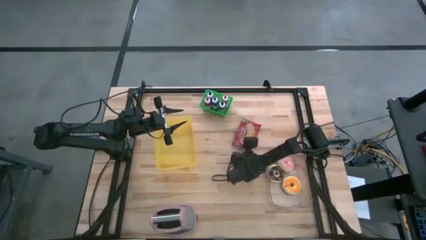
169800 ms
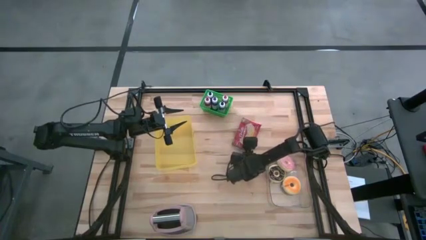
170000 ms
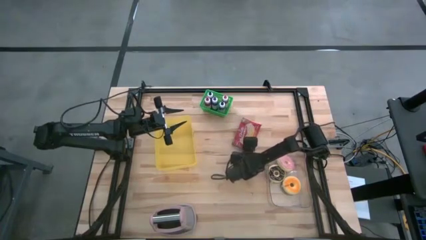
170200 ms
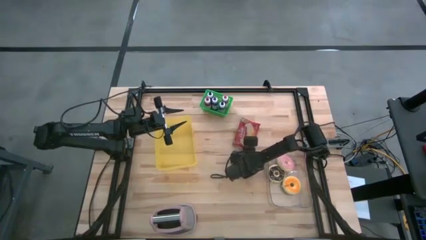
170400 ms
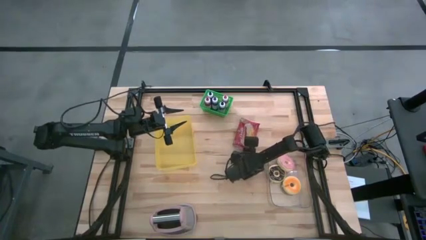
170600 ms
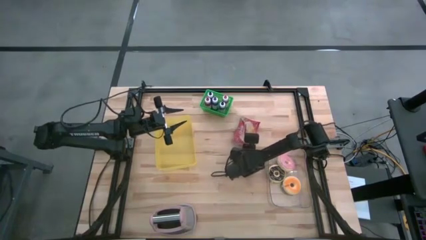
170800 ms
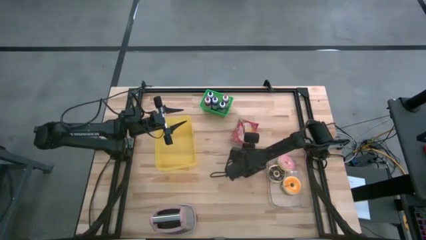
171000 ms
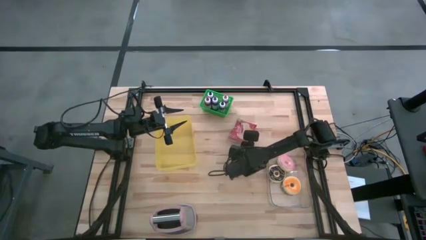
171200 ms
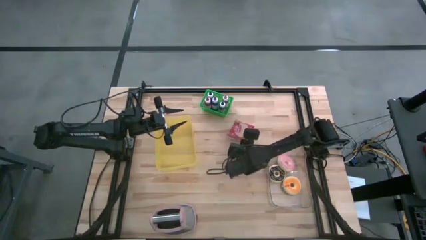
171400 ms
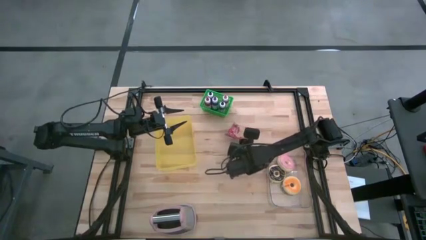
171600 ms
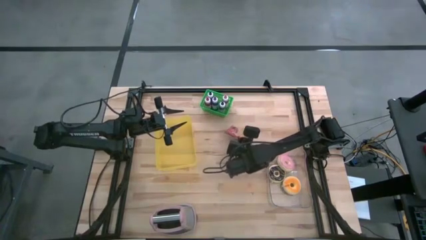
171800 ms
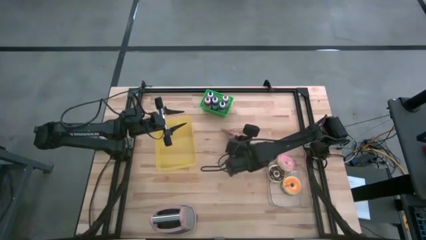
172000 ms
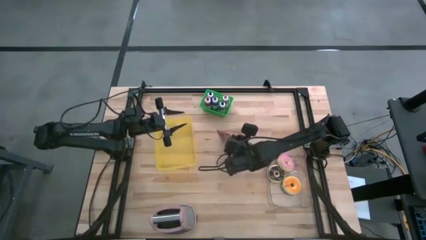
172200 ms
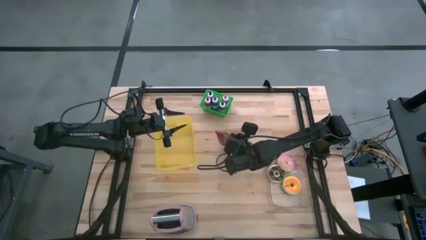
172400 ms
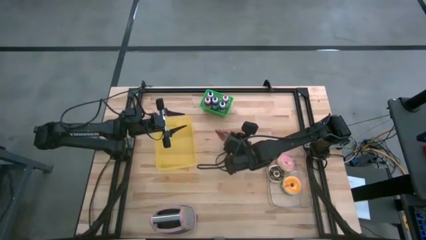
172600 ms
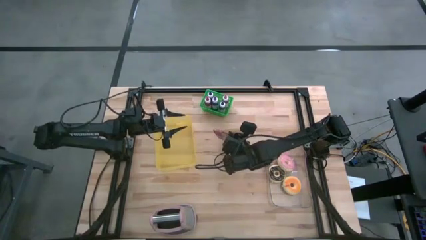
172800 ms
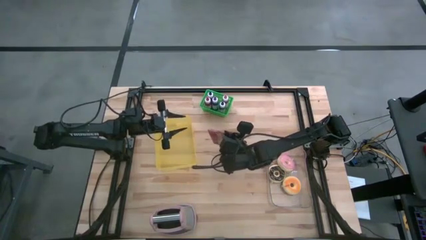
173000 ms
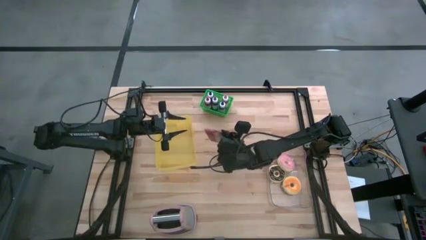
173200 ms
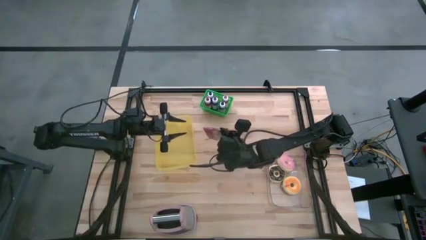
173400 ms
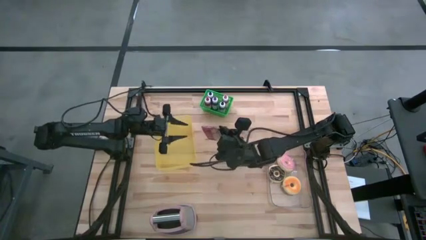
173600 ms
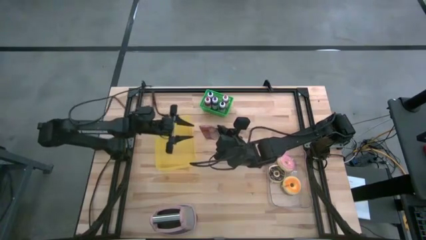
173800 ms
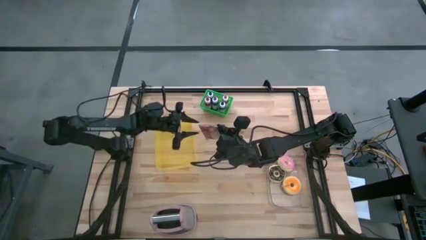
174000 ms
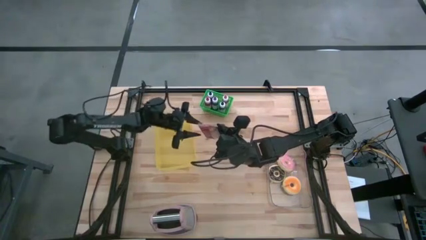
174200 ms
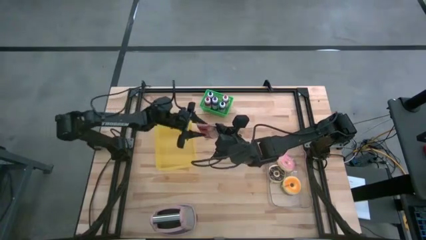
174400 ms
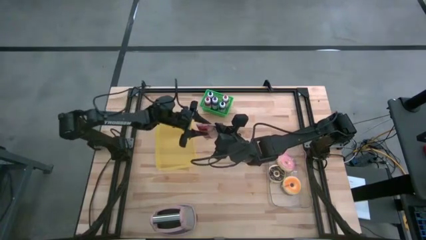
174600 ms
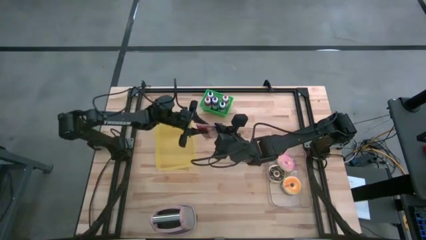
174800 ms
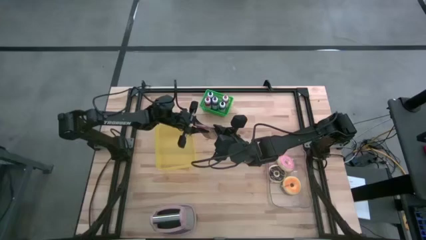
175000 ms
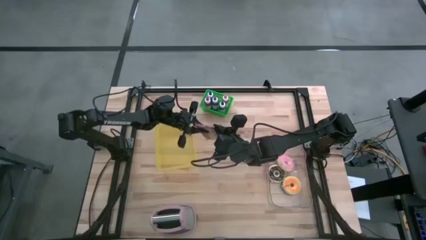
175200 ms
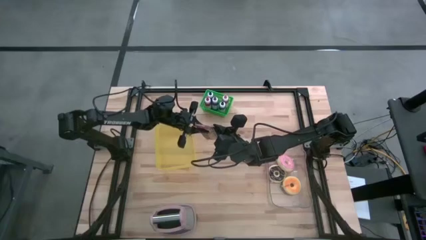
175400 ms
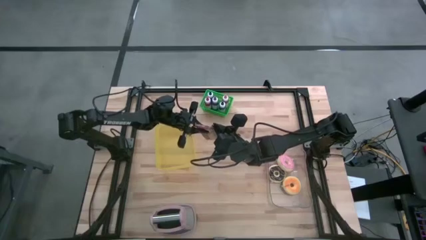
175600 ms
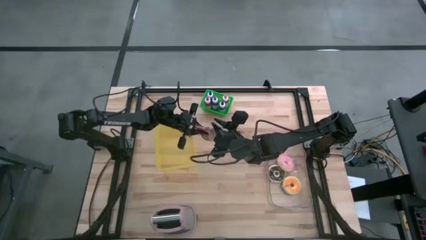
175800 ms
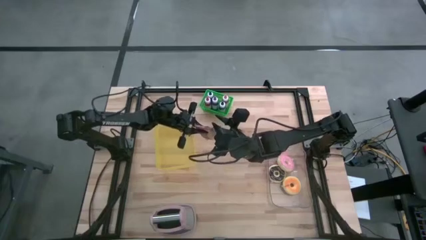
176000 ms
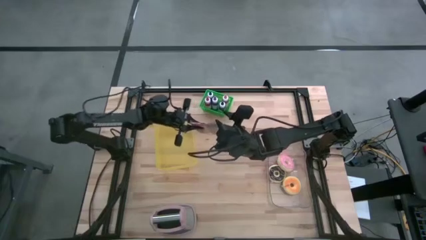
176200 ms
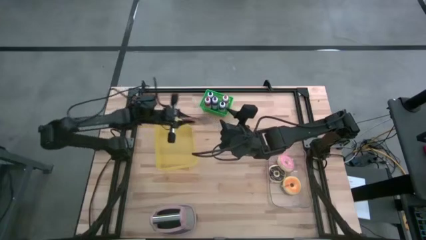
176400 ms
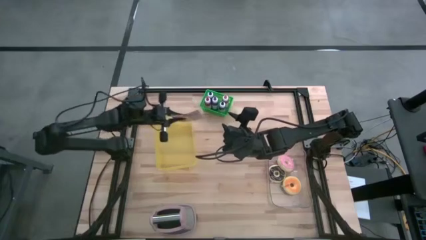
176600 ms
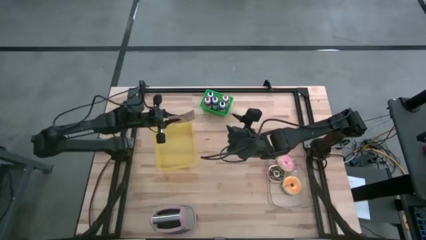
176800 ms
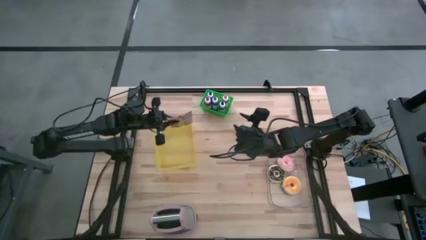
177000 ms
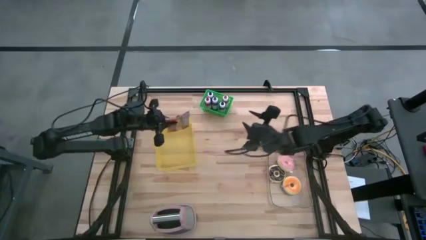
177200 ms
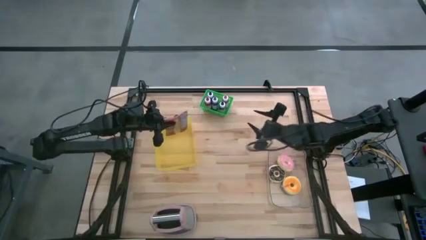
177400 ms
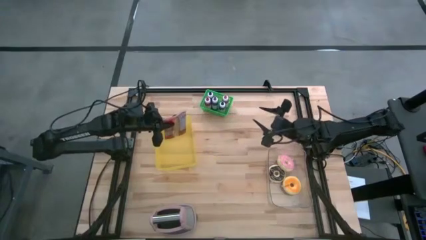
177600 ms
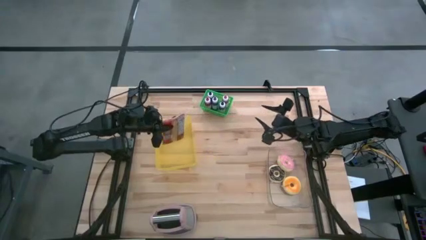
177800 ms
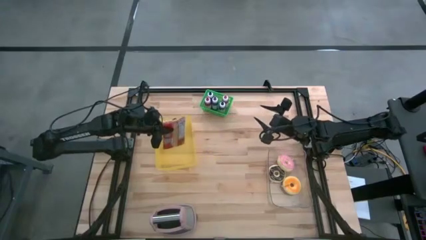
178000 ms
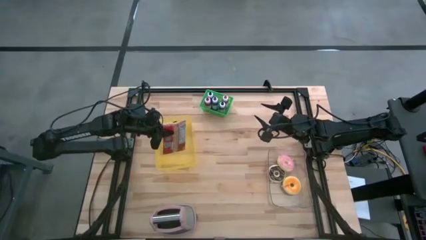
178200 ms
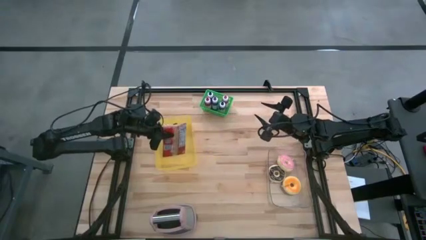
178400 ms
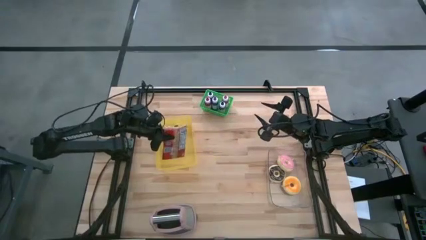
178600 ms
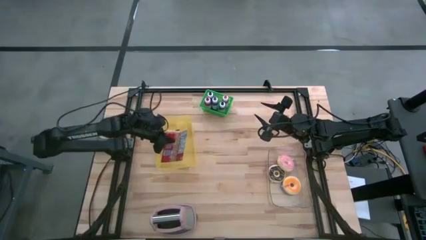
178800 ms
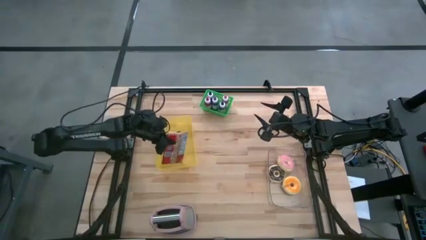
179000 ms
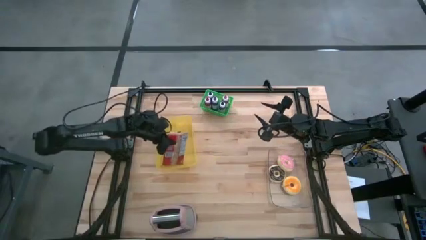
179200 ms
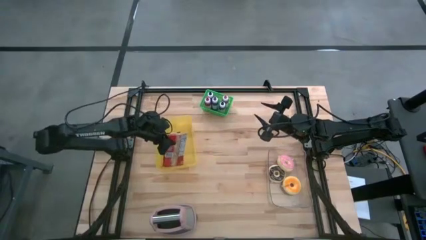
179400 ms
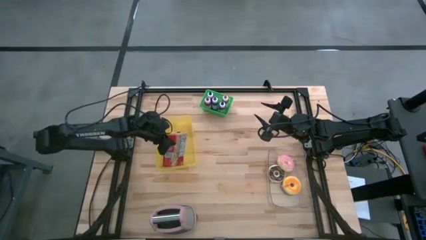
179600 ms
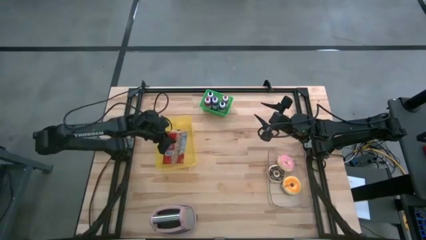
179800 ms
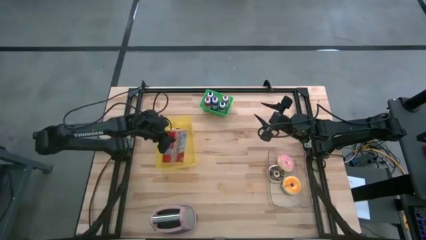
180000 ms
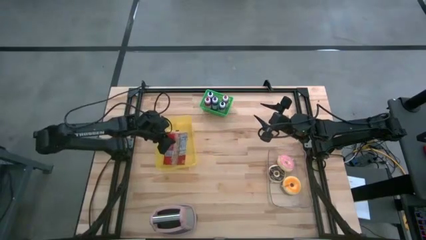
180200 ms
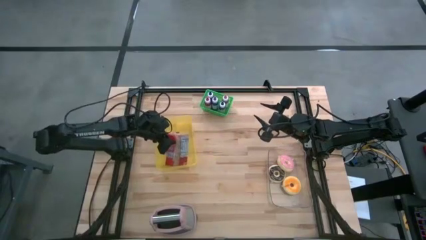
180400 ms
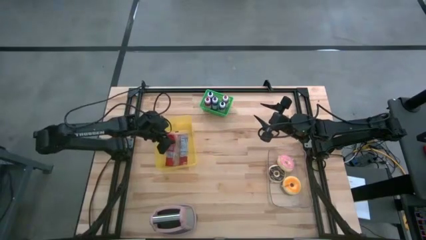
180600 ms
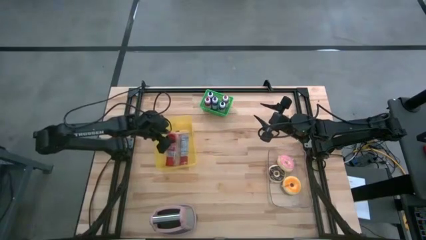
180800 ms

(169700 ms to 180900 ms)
Task: Pick & Place Food Item
Put the red popcorn bag into the yellow bin

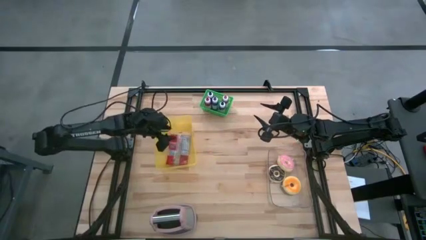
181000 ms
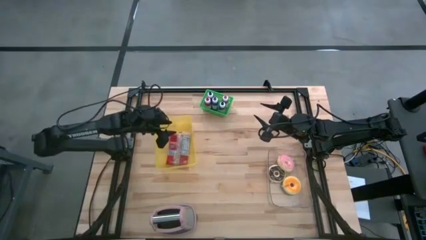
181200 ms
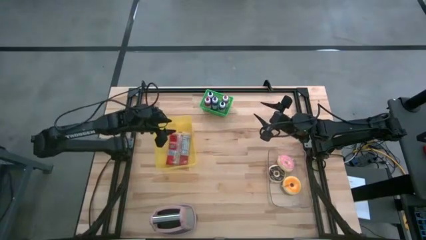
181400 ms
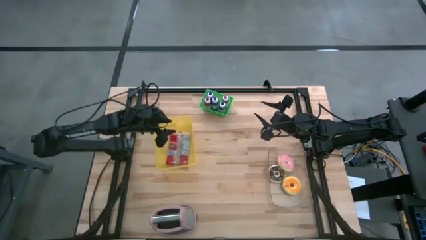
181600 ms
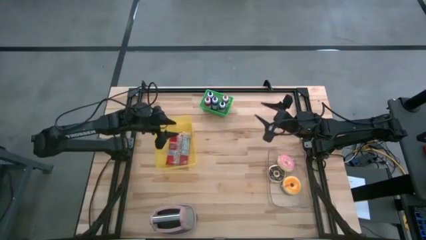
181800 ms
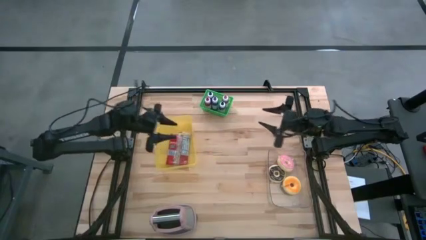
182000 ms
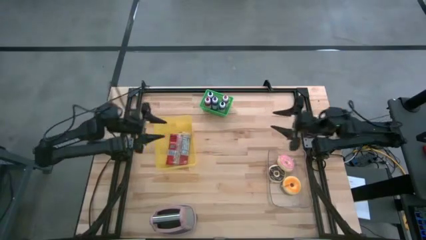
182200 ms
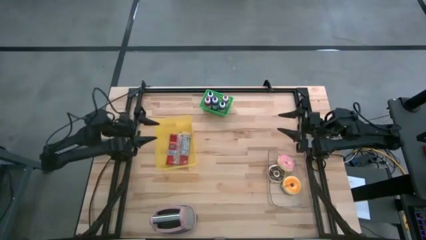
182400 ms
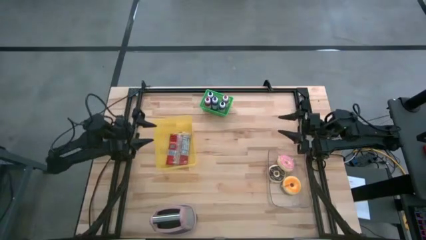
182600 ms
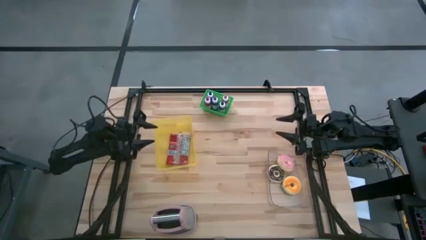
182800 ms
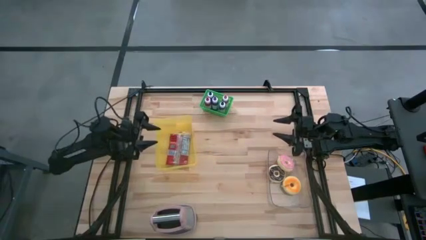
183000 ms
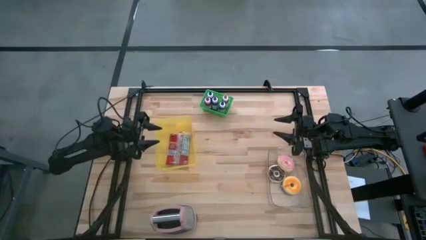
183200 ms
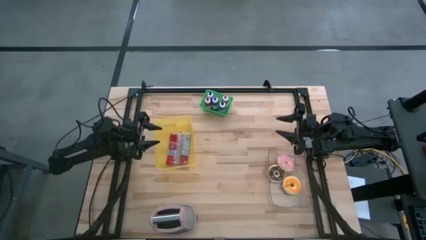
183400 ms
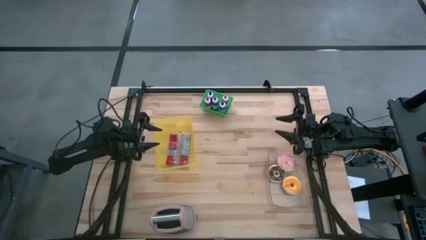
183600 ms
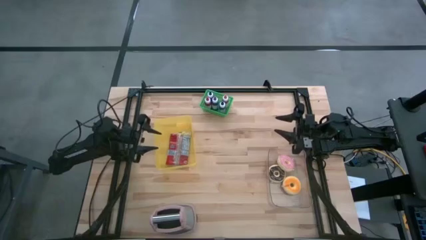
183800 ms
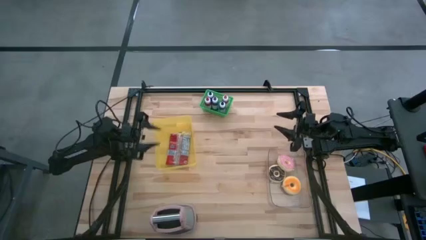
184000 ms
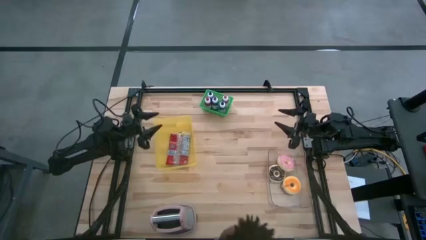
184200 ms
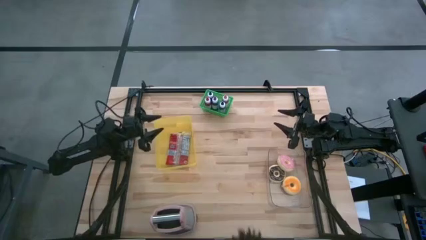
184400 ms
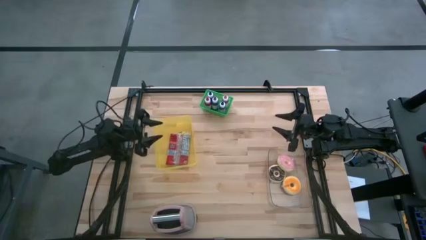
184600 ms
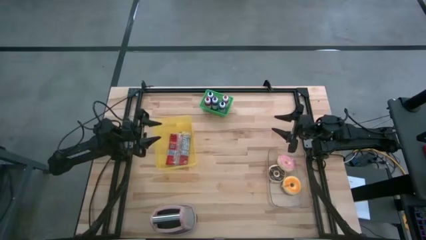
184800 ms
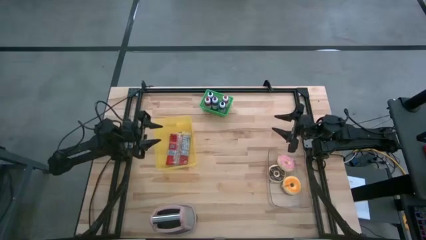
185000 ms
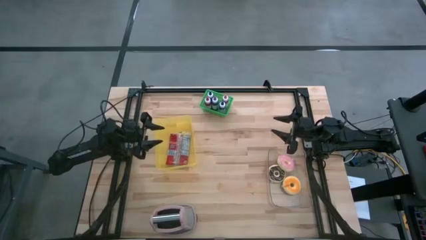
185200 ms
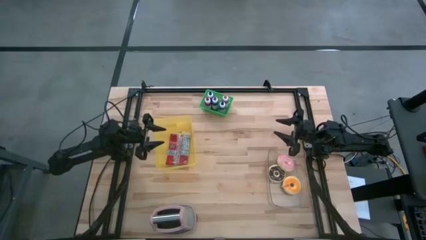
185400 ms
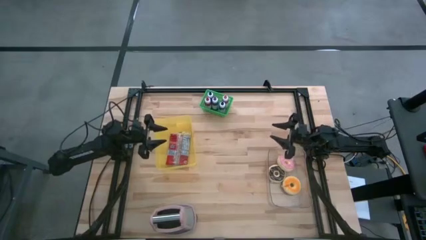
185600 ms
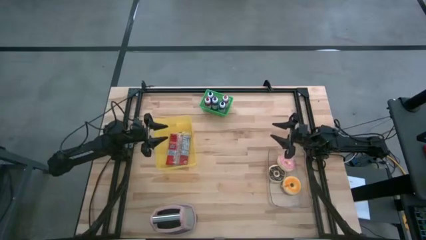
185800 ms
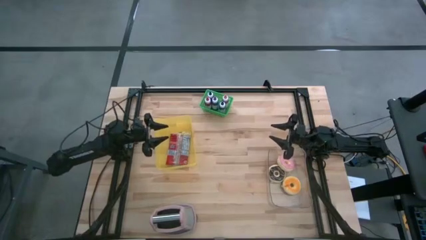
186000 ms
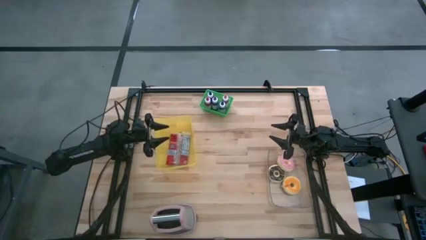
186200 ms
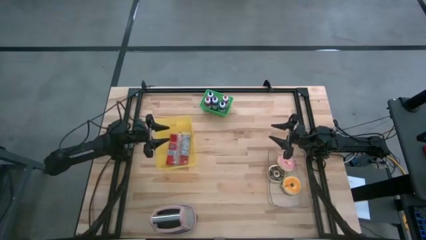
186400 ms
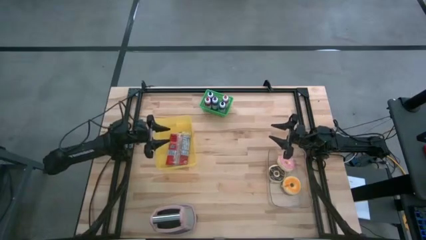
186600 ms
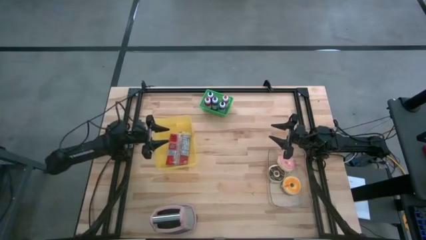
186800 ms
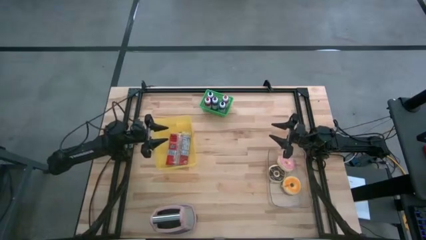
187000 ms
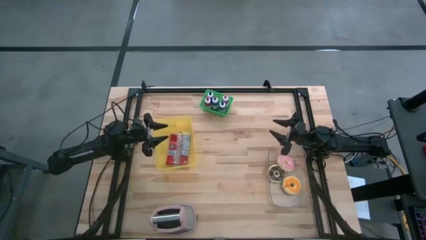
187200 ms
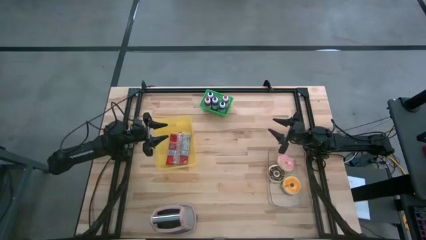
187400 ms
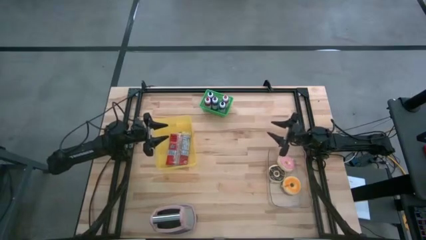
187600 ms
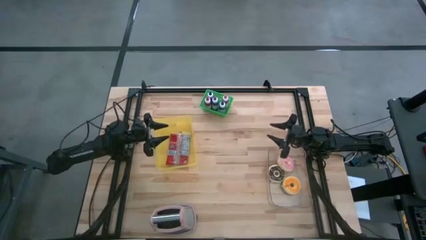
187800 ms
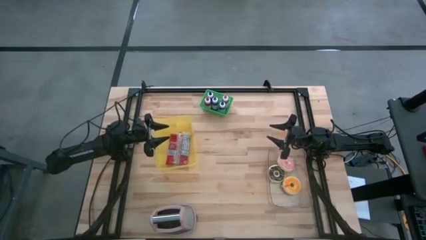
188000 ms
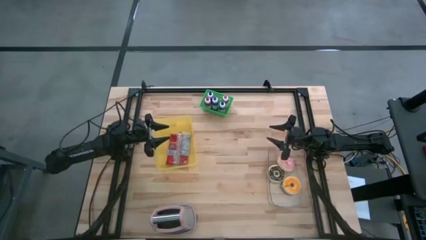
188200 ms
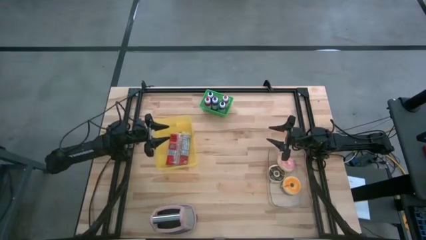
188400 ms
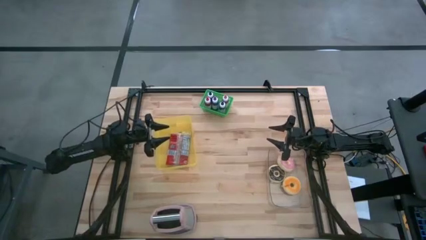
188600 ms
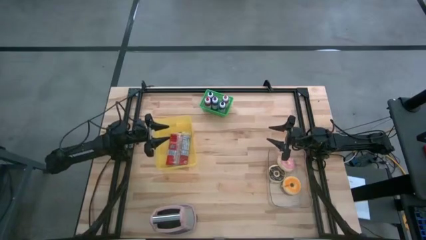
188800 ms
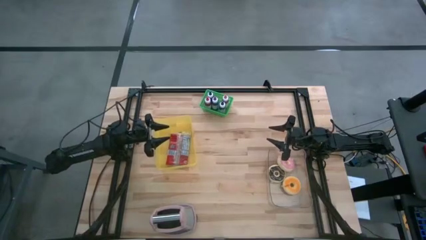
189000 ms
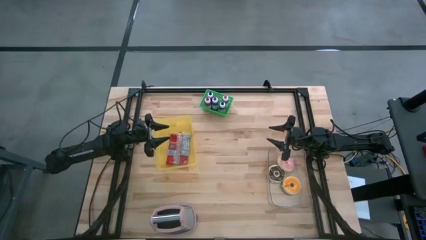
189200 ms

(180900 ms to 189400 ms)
Return to Home Position
